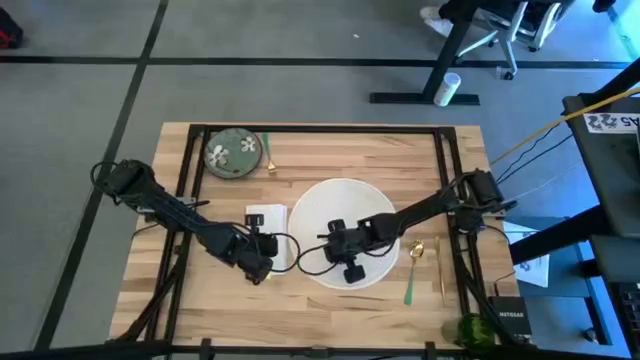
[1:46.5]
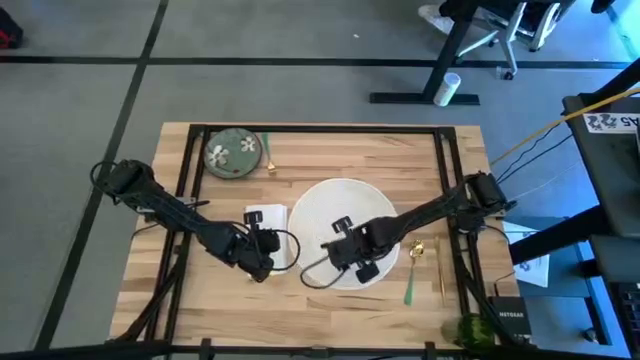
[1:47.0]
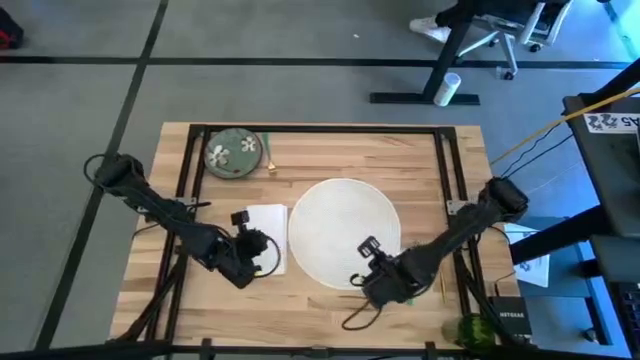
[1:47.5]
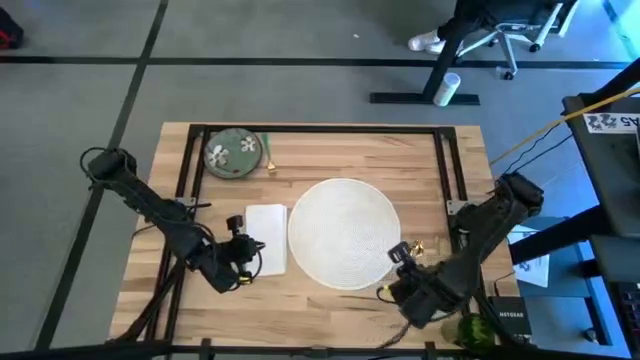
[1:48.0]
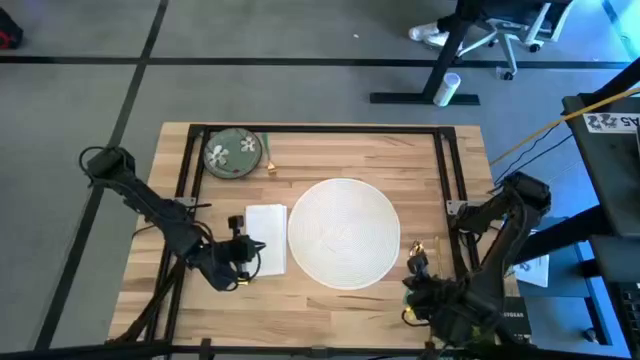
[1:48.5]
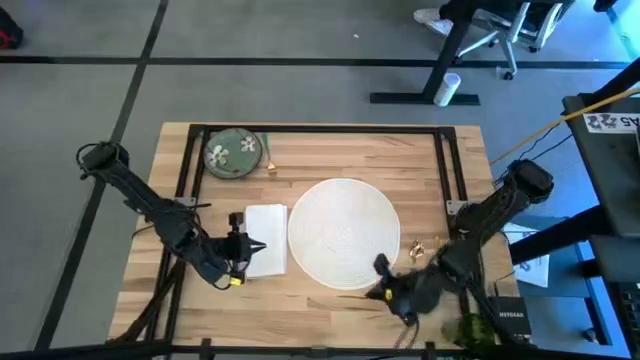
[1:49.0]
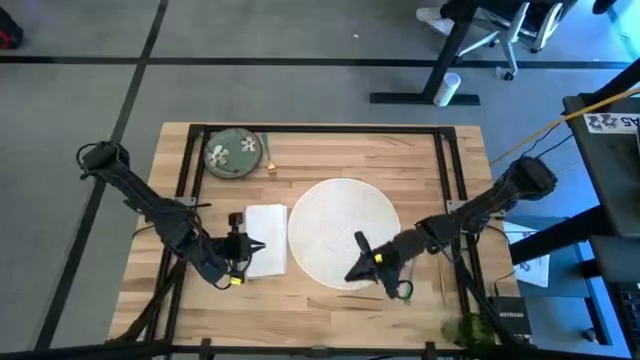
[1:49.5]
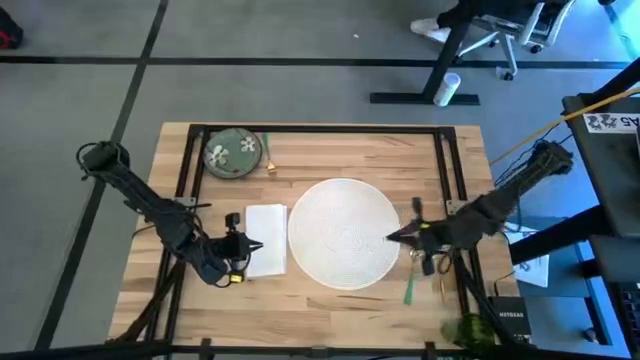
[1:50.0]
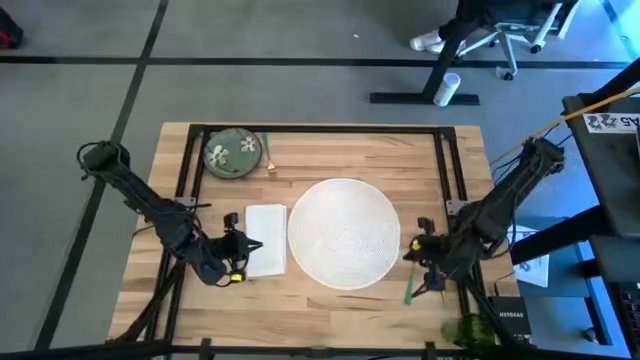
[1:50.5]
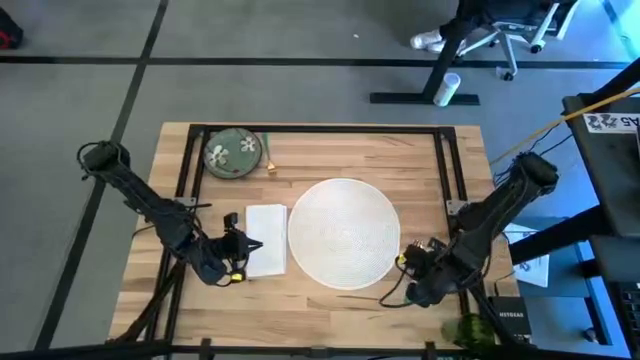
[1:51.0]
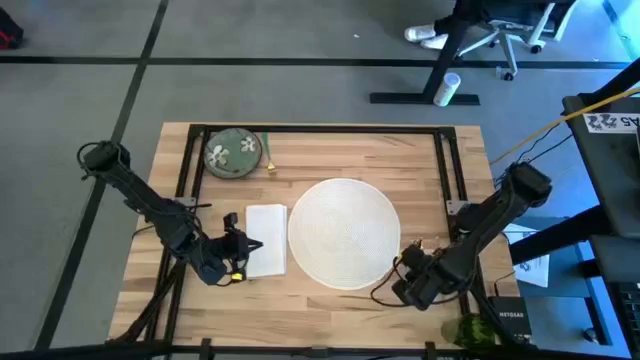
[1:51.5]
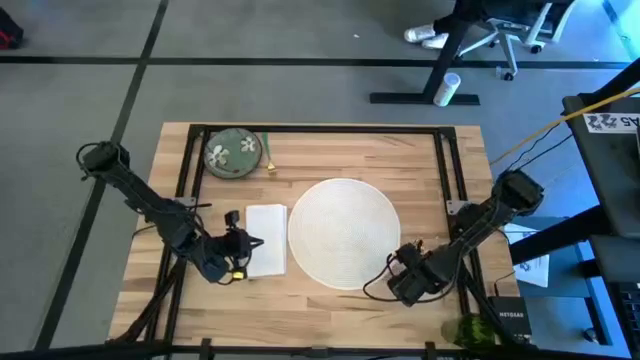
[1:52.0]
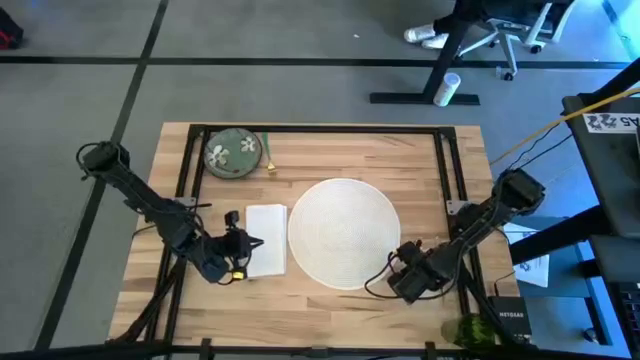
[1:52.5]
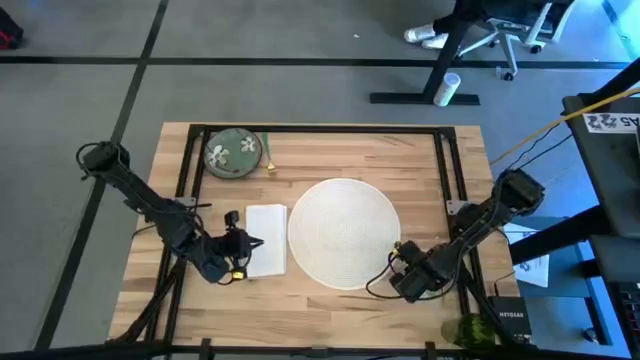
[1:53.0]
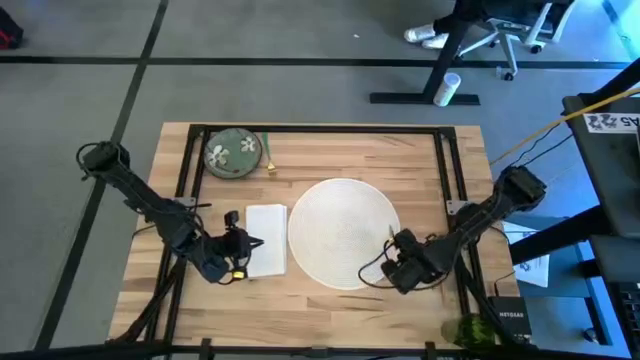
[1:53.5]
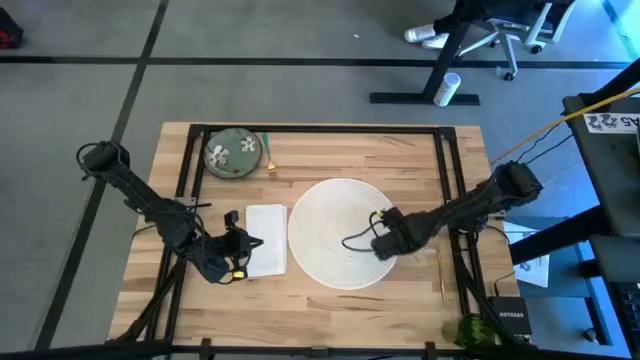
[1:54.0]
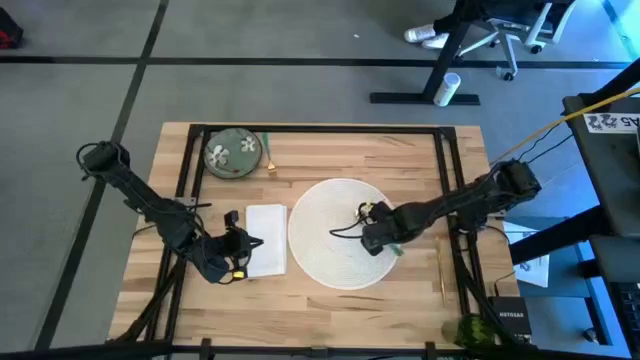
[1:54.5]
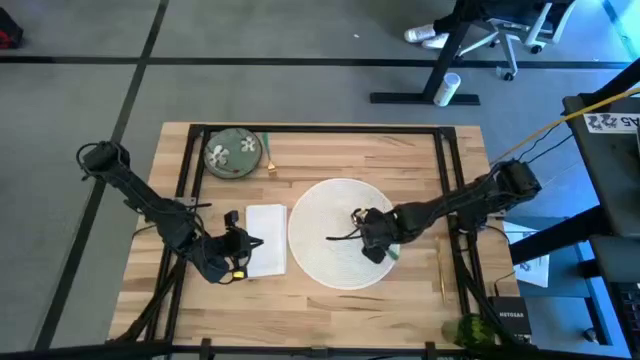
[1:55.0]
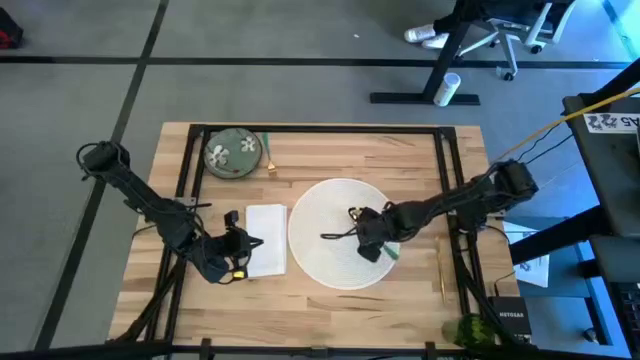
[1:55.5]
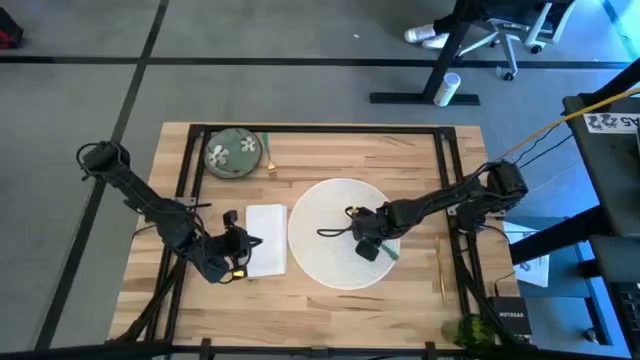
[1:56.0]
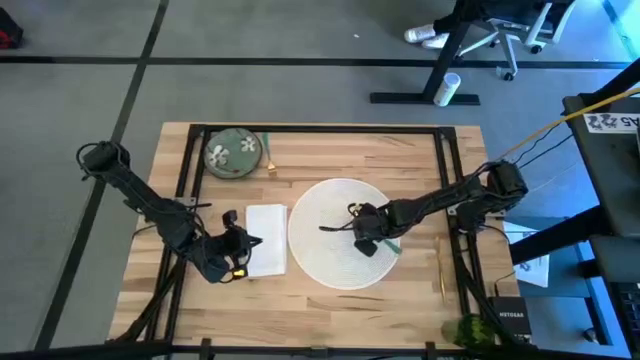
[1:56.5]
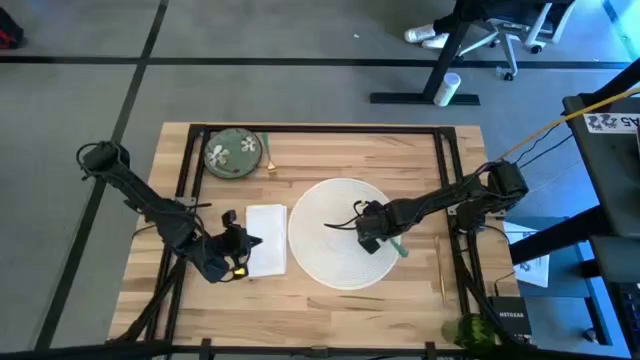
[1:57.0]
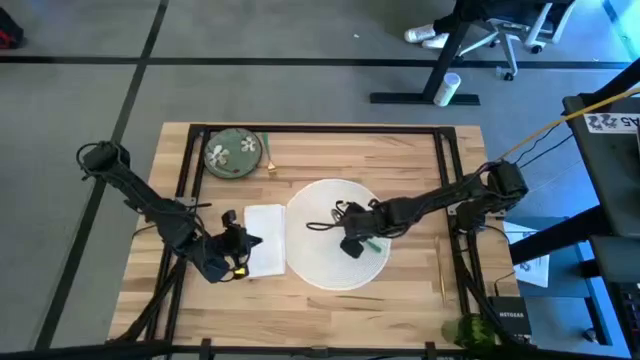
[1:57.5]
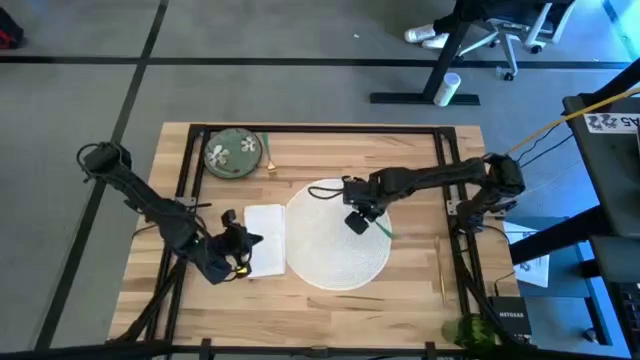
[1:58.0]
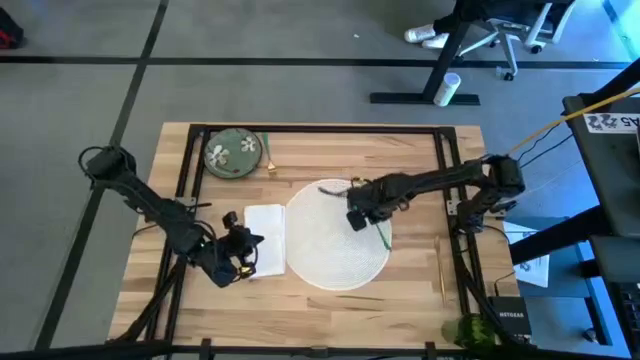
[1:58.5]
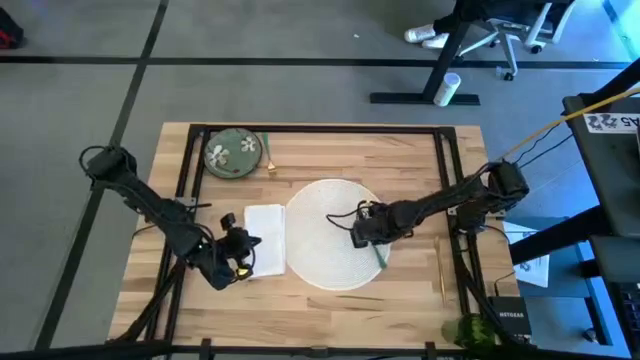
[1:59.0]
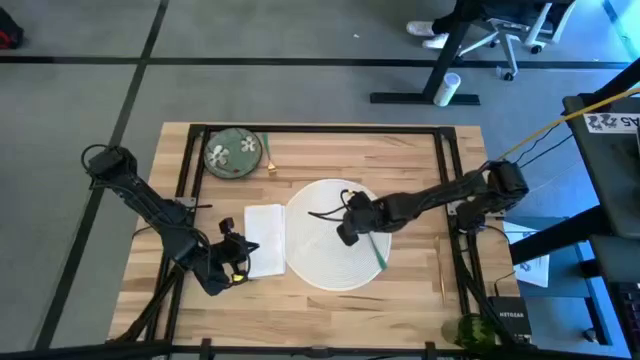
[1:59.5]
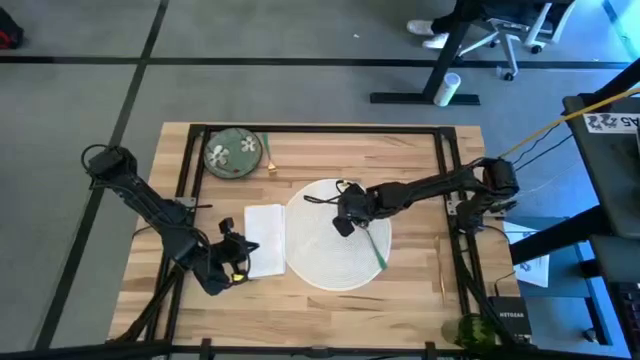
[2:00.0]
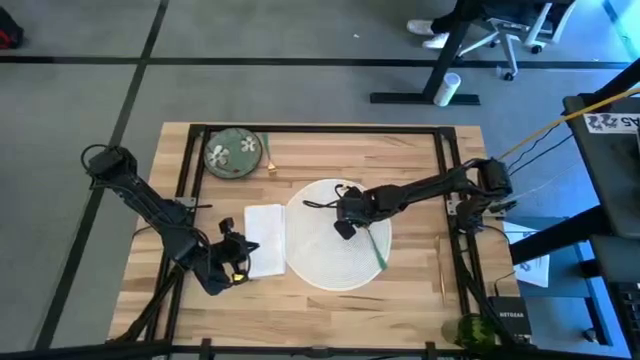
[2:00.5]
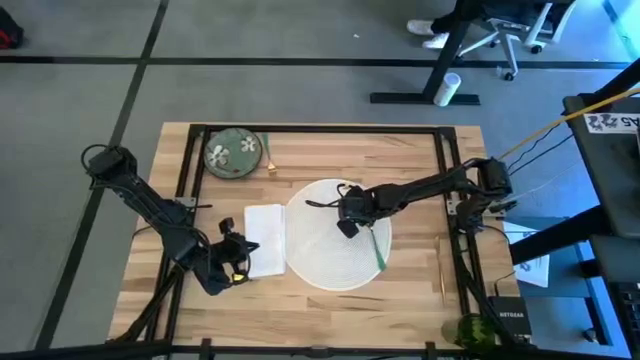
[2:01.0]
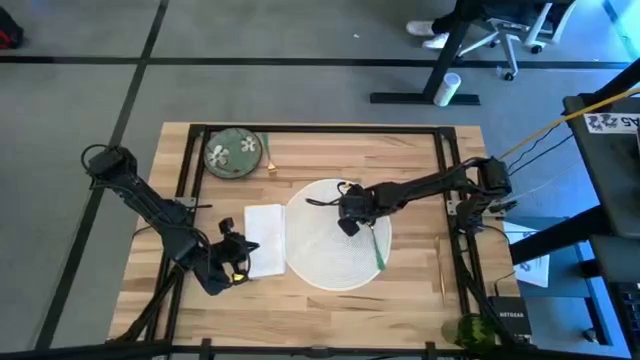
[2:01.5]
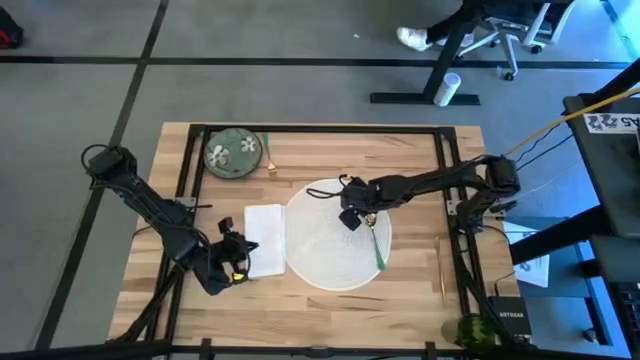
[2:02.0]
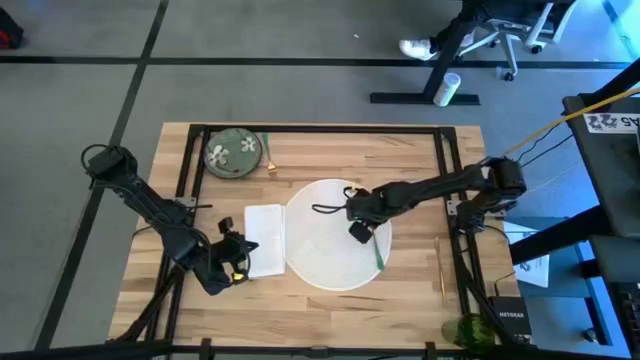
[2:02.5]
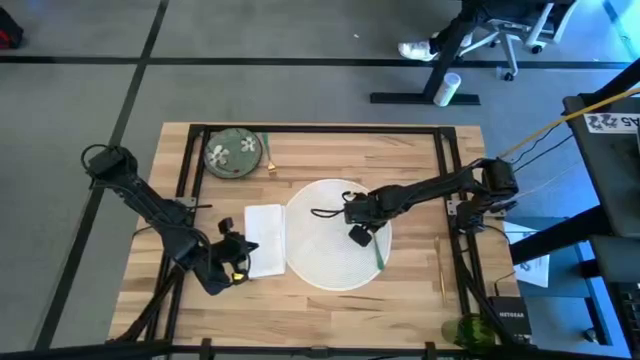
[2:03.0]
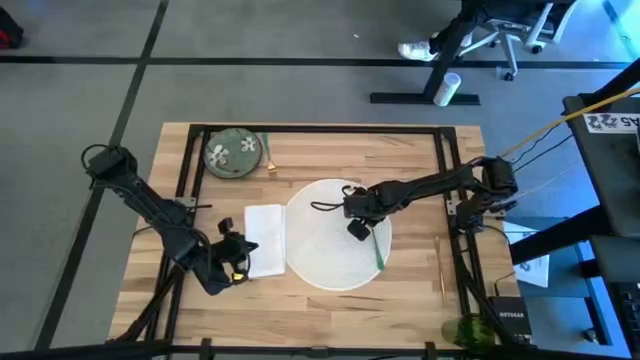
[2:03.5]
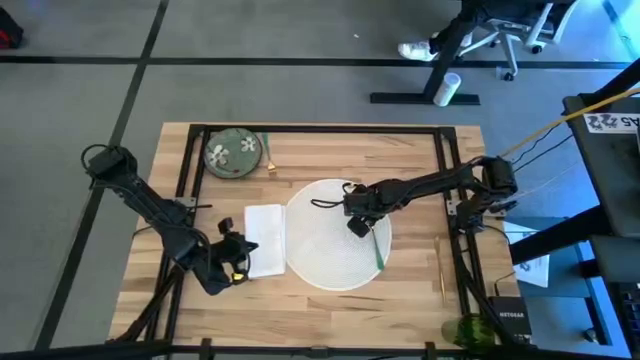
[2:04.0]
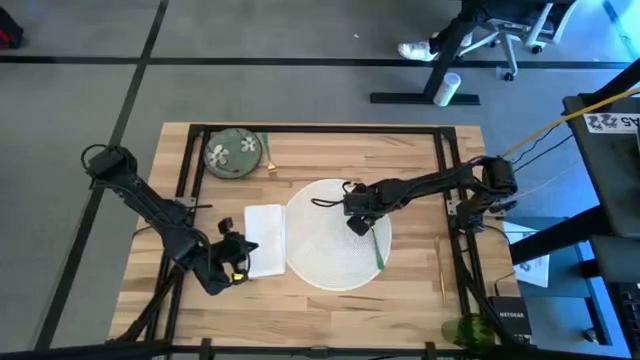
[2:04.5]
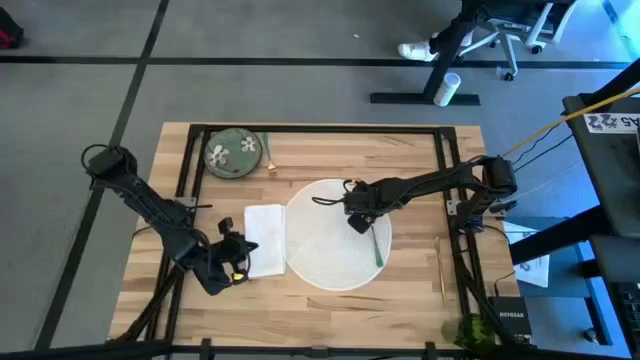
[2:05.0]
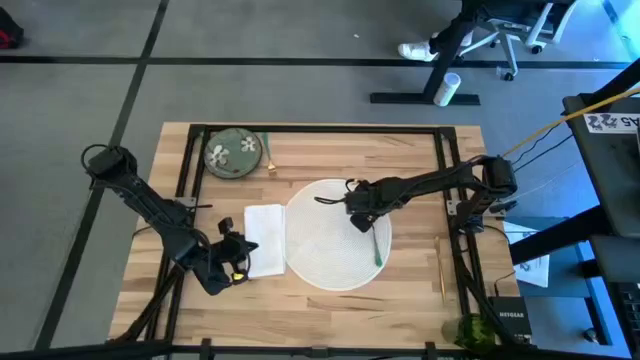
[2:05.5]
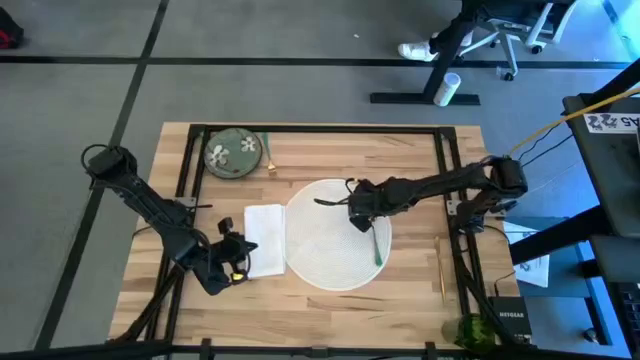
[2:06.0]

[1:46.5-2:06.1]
Task: Set table place
Put the green spoon on the right of the white table mat
